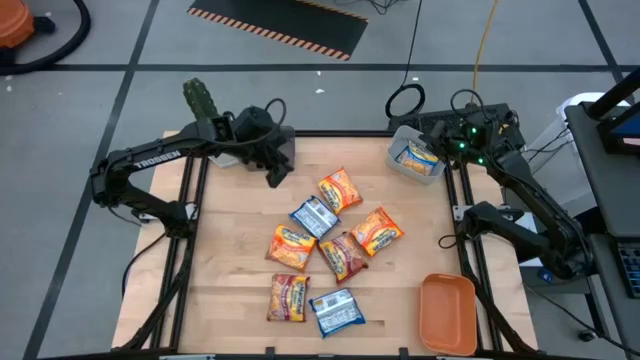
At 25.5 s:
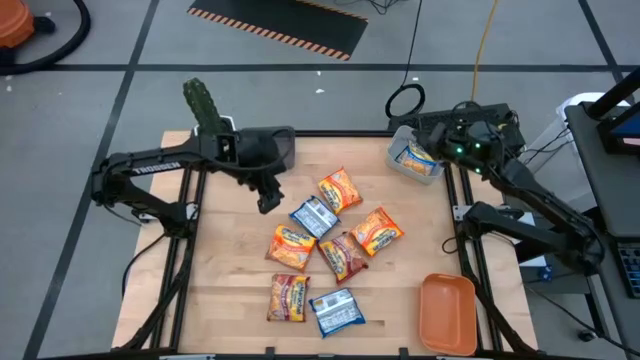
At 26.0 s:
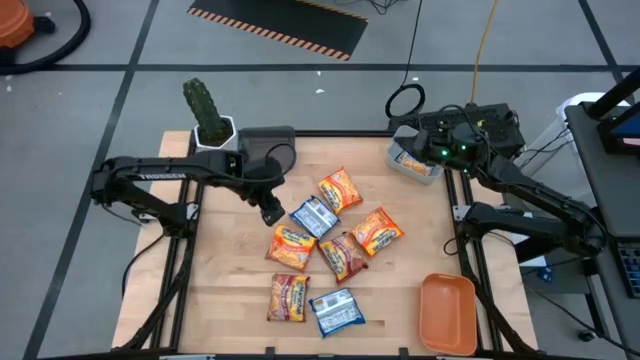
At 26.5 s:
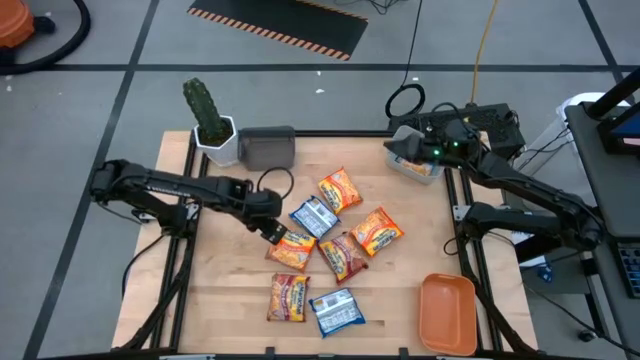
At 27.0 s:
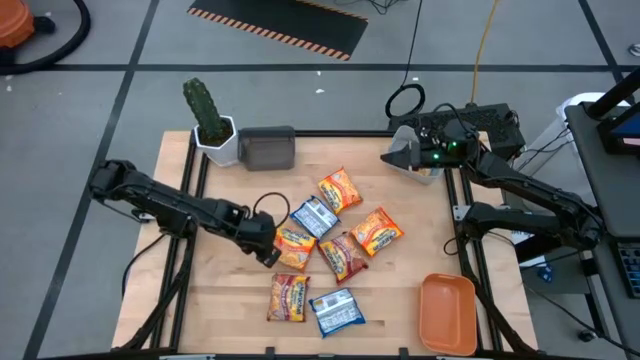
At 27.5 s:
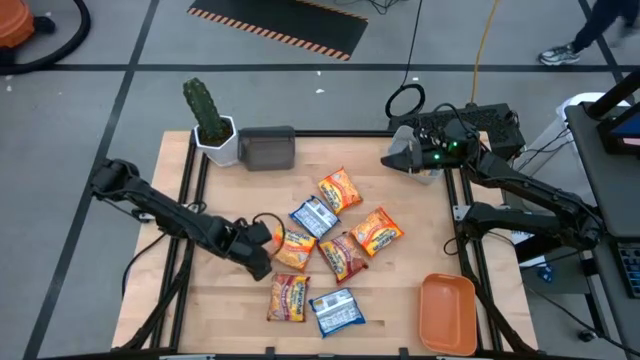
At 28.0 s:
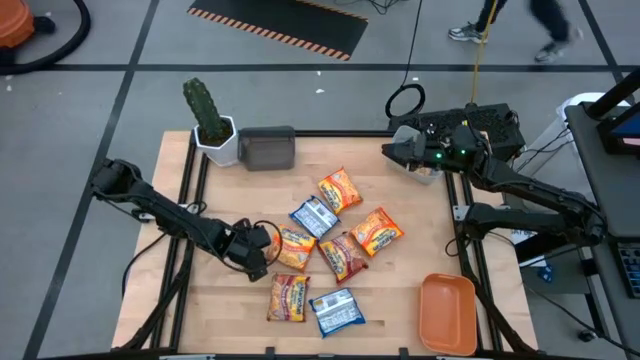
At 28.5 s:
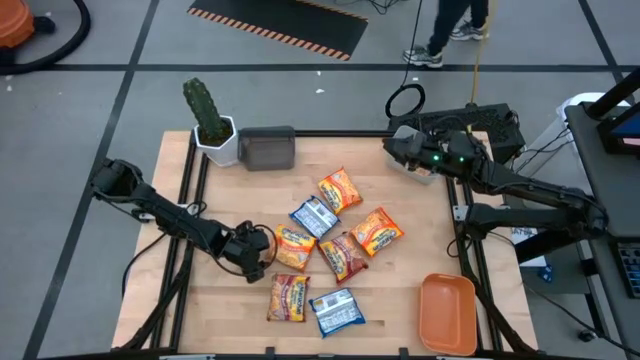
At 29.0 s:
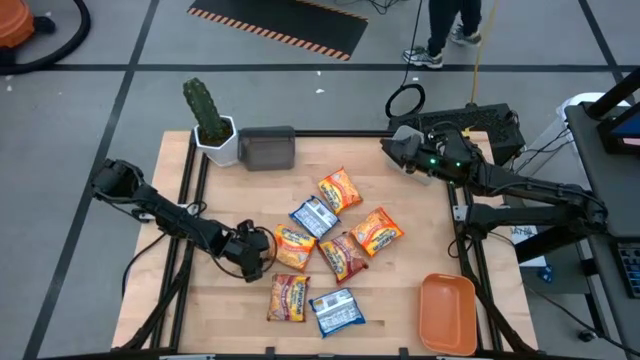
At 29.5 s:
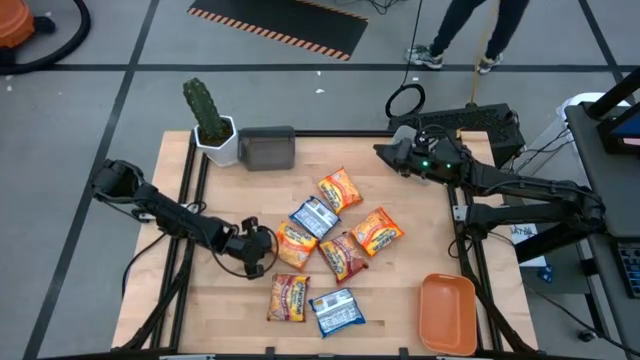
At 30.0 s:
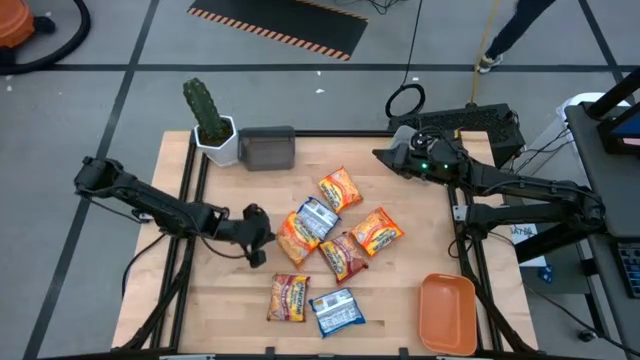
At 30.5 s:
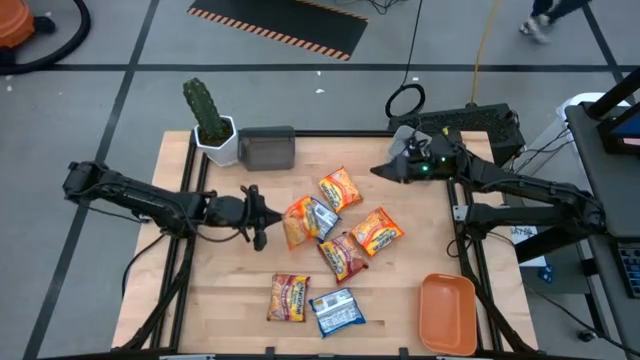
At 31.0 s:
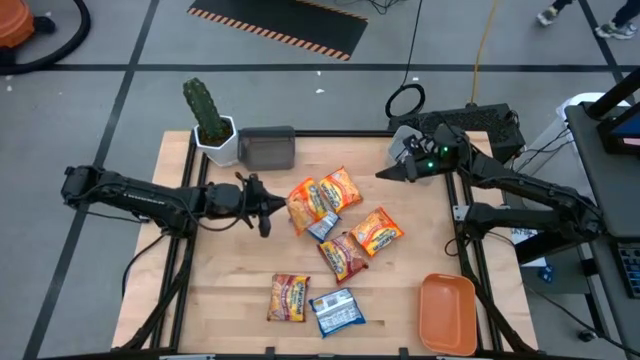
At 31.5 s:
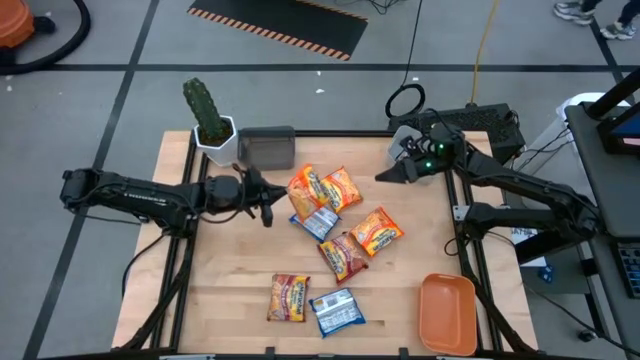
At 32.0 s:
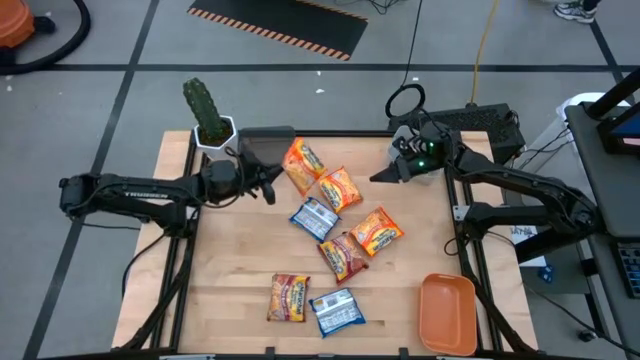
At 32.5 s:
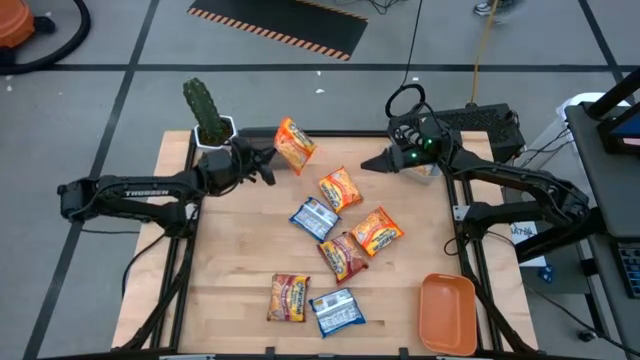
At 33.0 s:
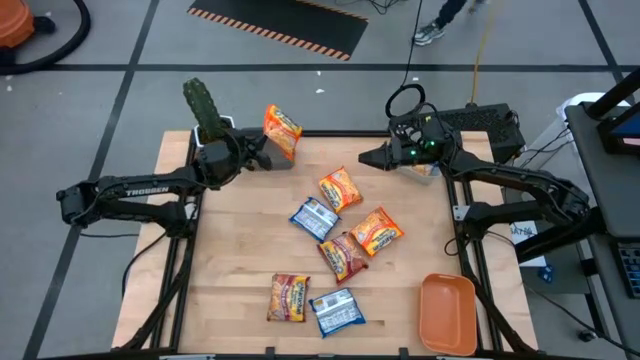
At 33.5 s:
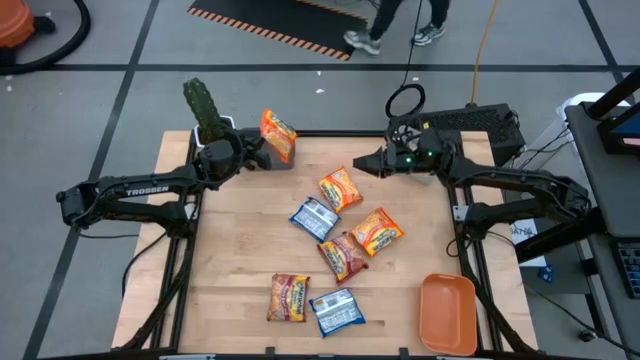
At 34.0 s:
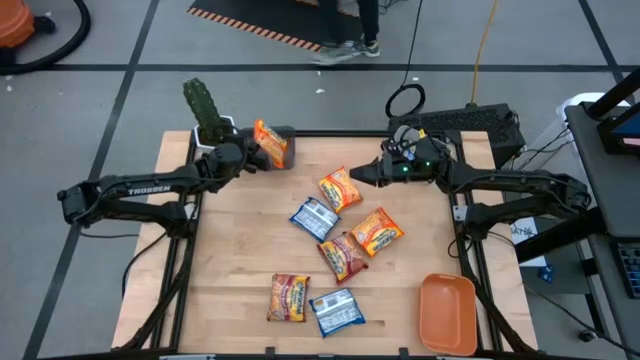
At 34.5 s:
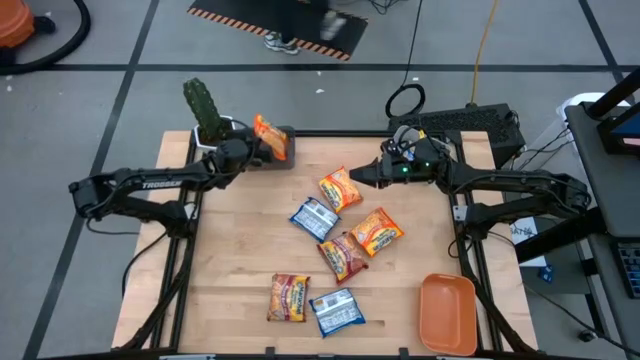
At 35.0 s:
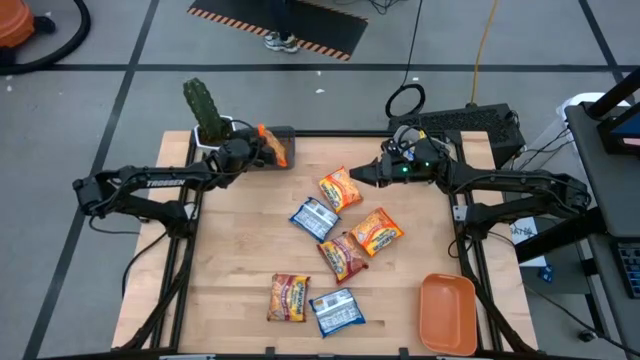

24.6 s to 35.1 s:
Task: Sort Maruchan noodles
Put the left orange noodle pack into the black bin

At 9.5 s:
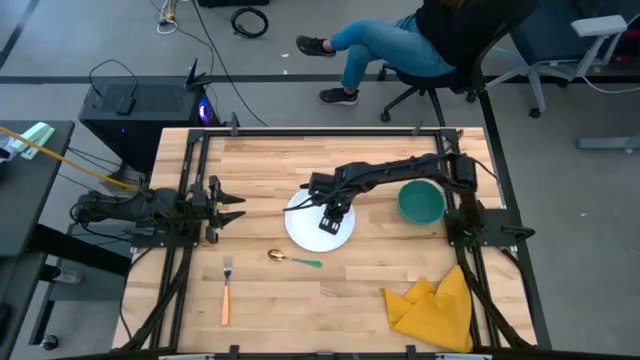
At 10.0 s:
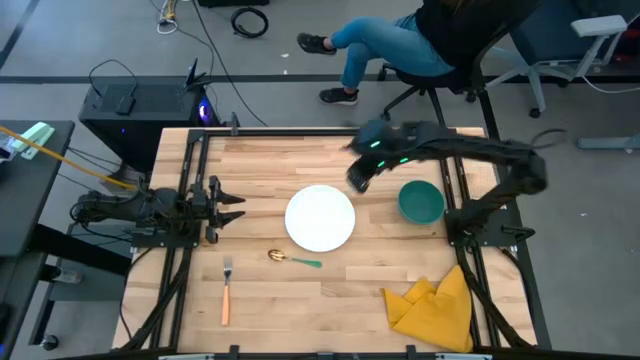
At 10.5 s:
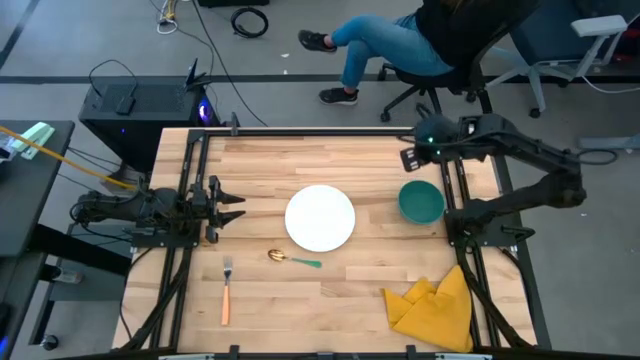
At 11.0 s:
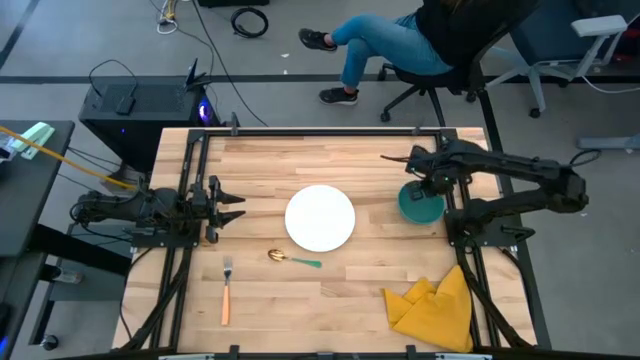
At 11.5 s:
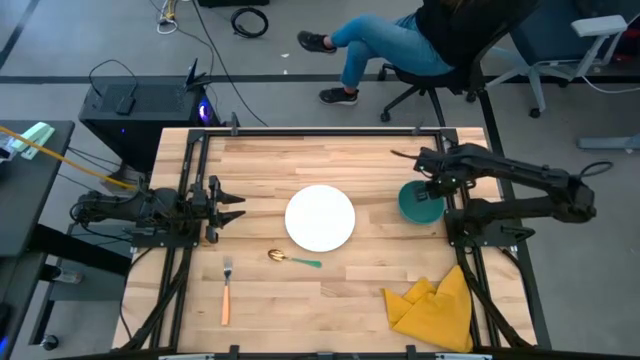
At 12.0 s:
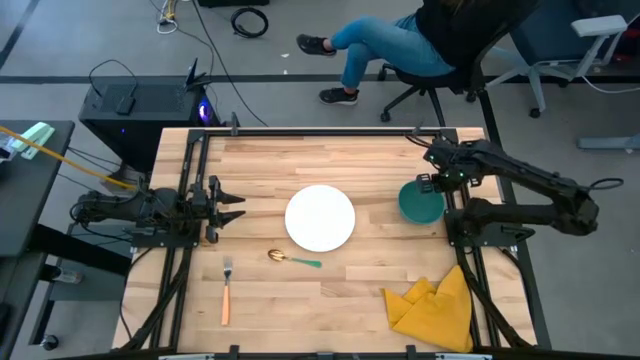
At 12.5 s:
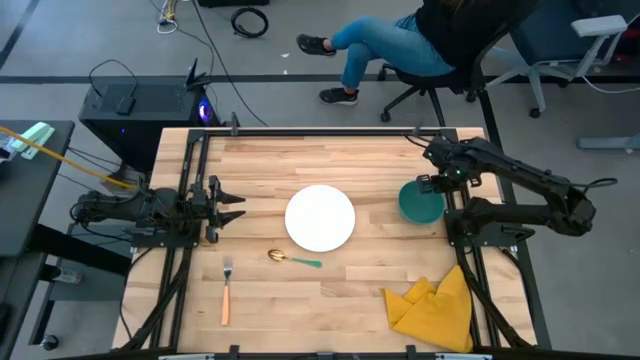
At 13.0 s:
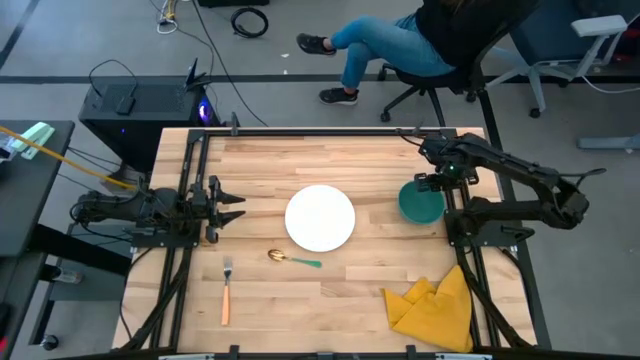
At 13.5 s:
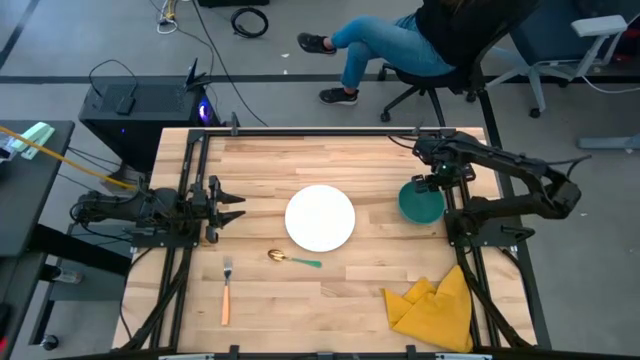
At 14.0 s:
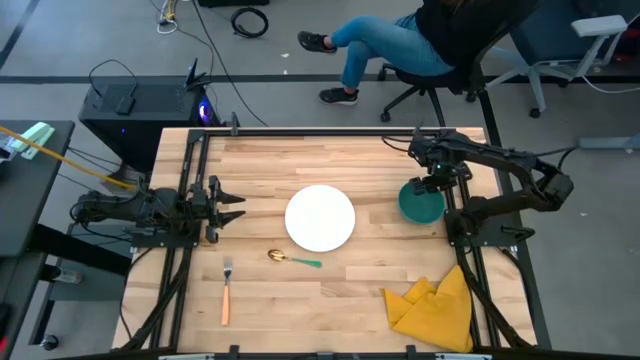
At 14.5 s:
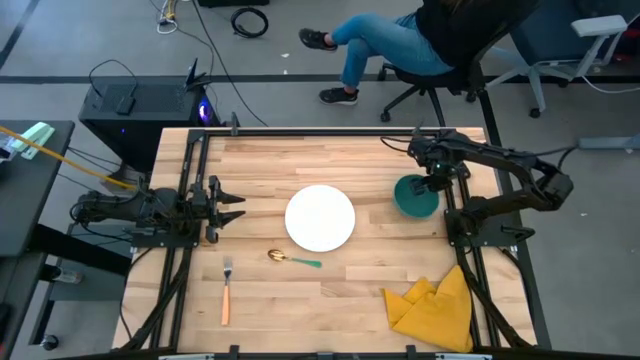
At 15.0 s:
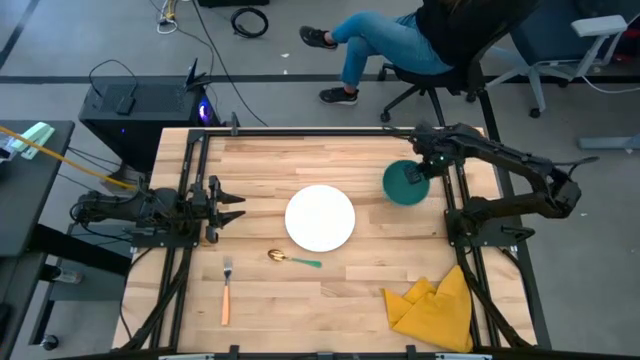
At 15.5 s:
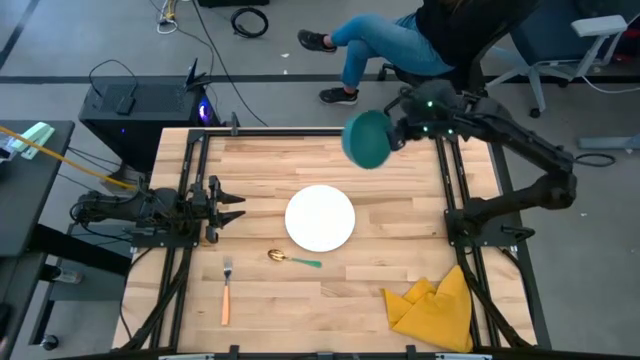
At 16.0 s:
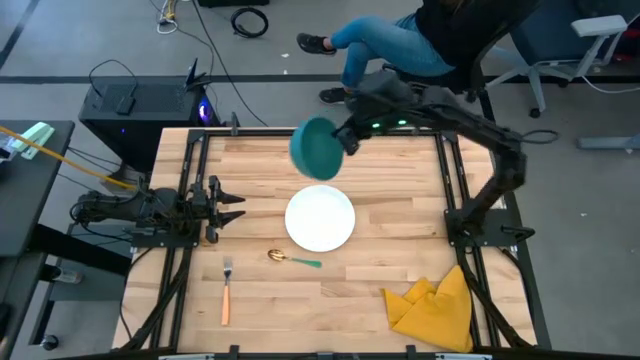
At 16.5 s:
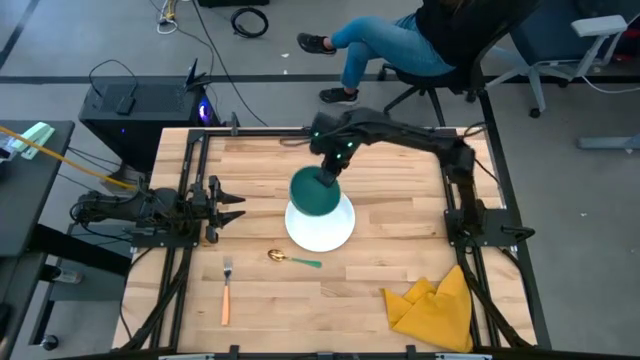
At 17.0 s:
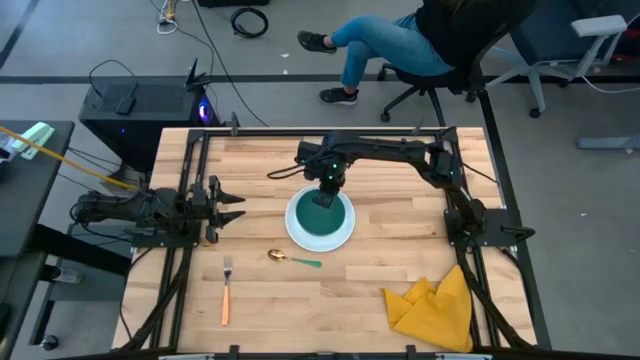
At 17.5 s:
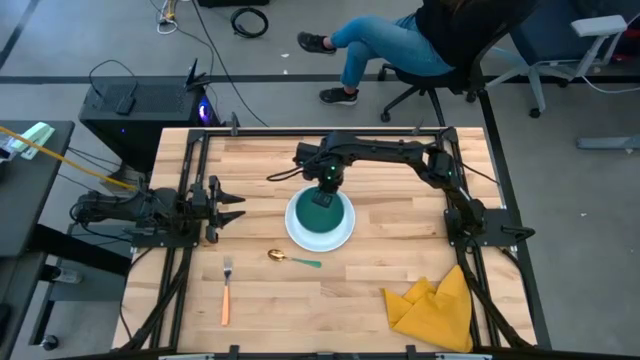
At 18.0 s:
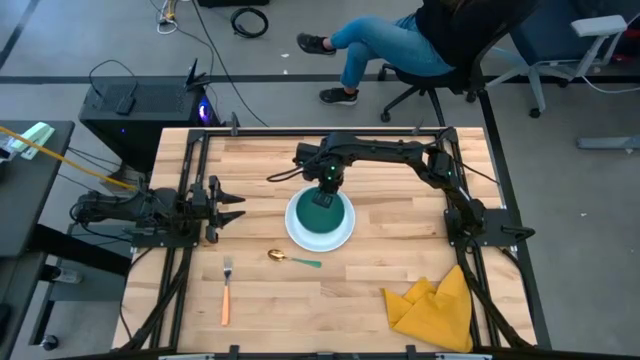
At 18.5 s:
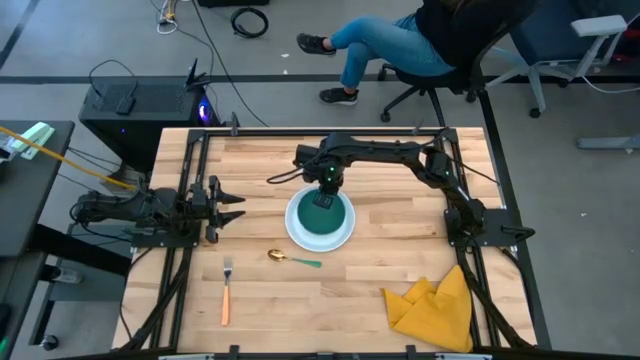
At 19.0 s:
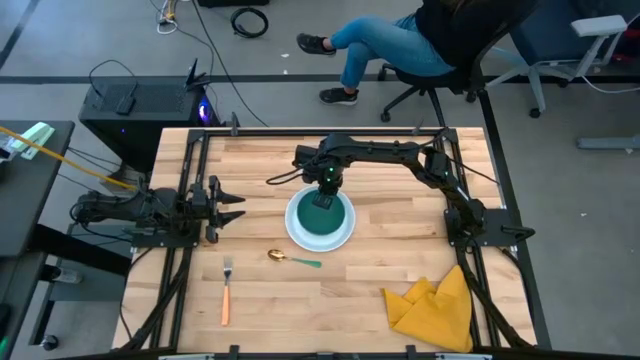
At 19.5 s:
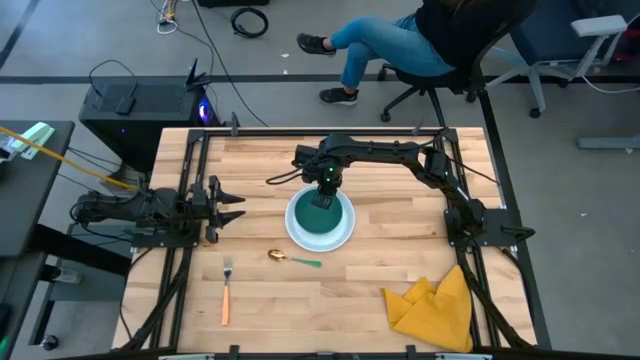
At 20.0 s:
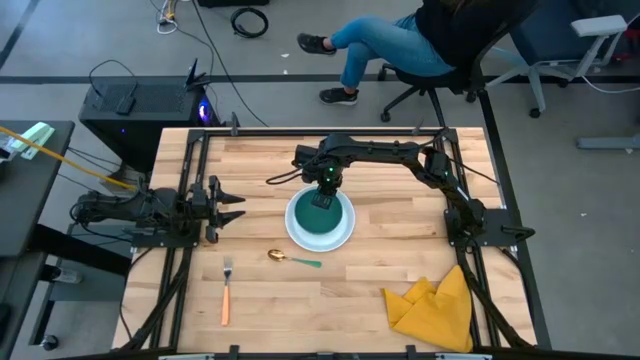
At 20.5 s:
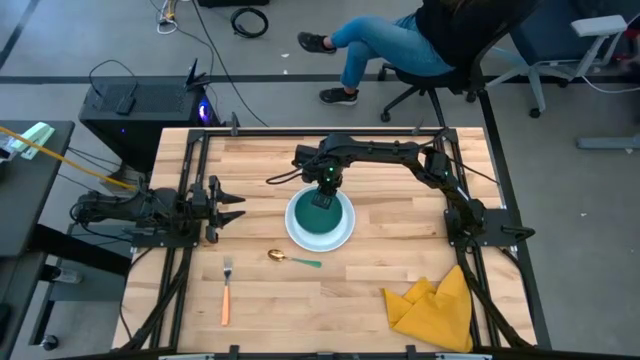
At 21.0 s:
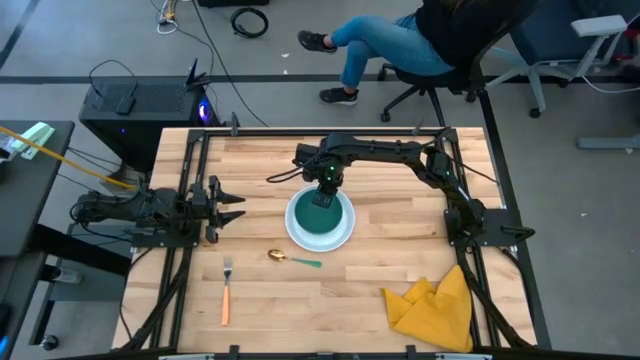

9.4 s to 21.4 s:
Task: Set table place
Put the green bowl on top of the white plate
